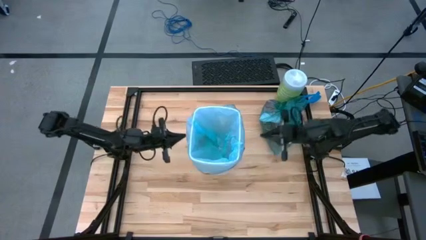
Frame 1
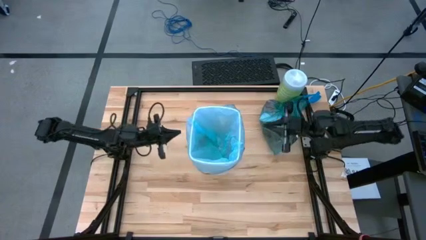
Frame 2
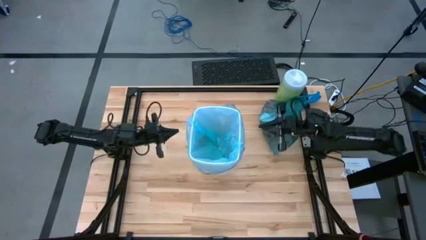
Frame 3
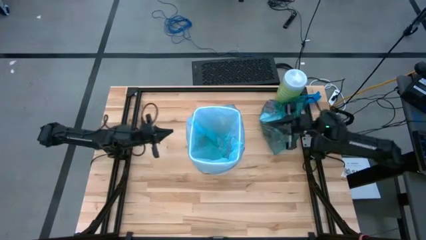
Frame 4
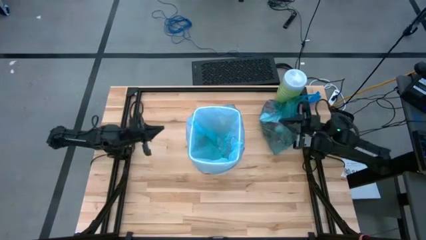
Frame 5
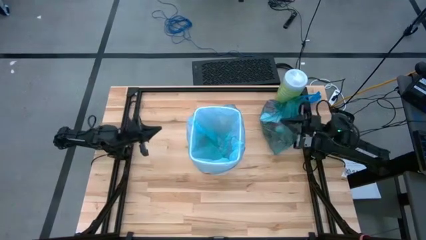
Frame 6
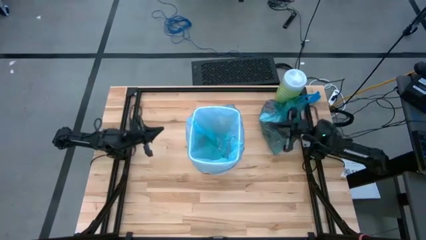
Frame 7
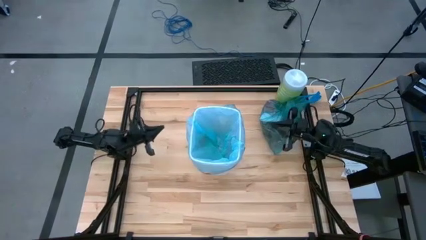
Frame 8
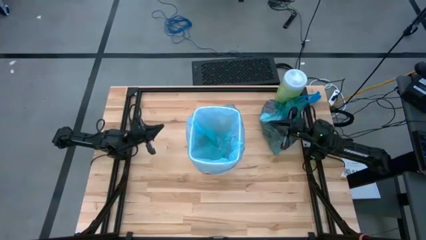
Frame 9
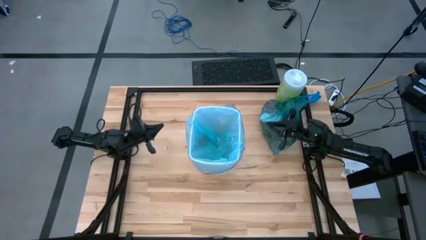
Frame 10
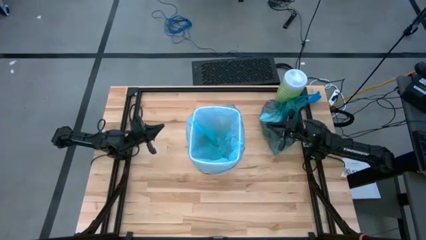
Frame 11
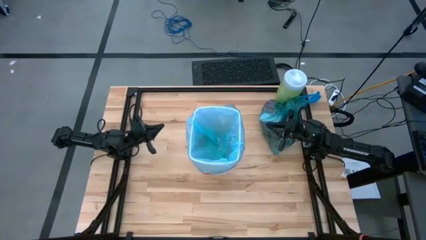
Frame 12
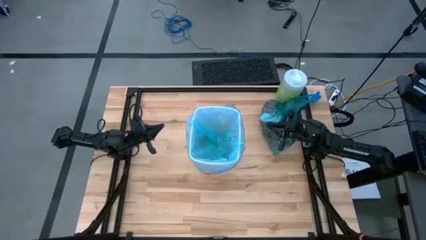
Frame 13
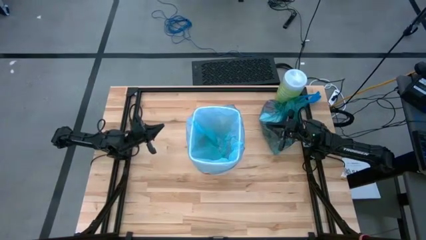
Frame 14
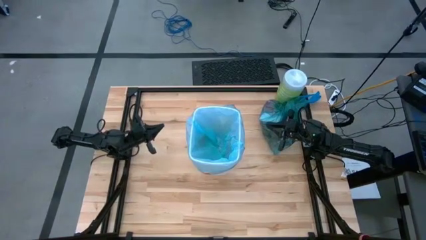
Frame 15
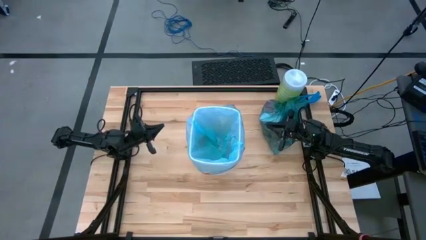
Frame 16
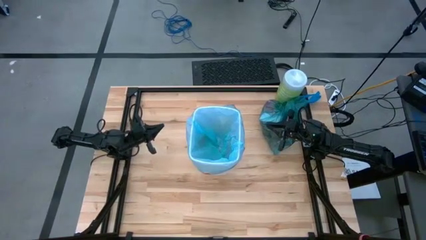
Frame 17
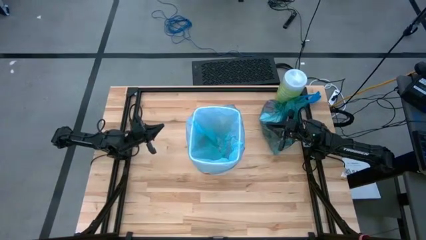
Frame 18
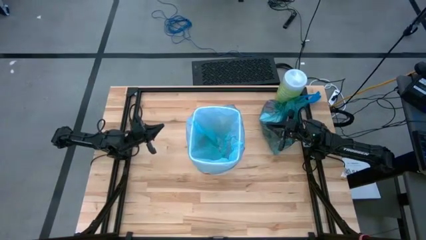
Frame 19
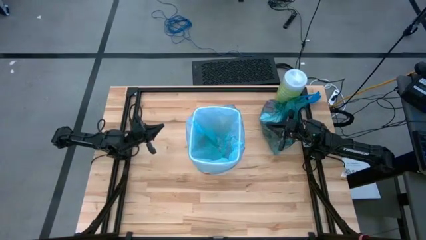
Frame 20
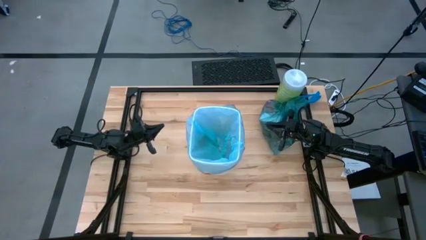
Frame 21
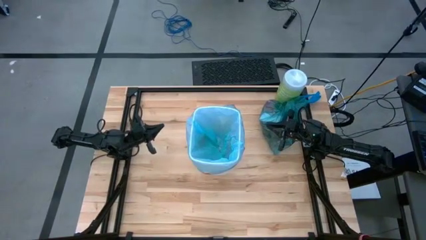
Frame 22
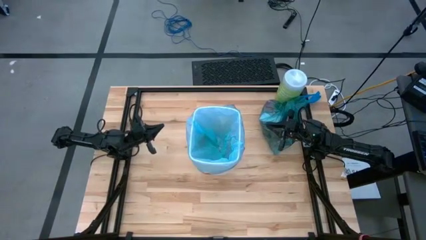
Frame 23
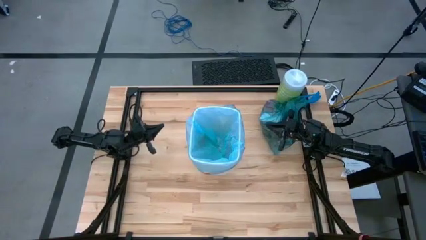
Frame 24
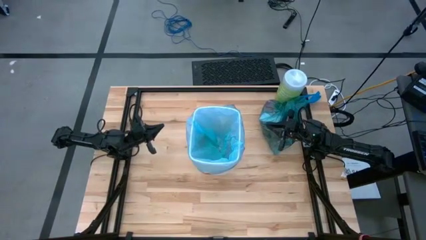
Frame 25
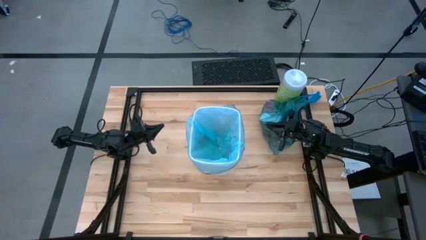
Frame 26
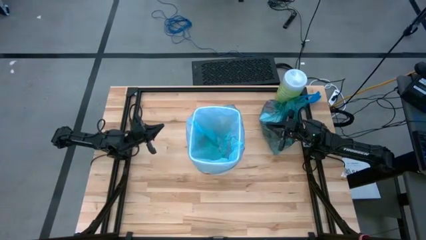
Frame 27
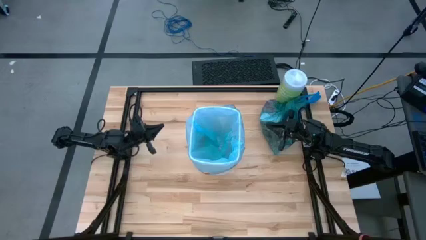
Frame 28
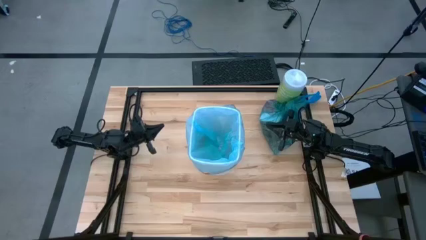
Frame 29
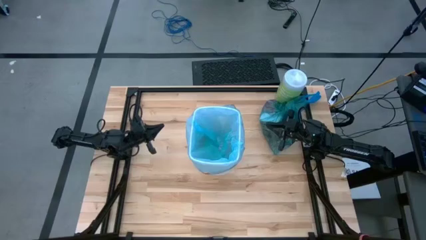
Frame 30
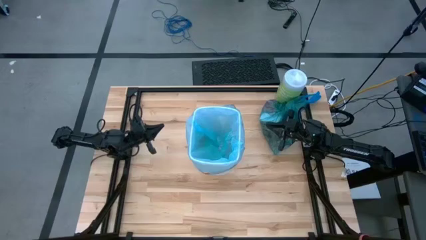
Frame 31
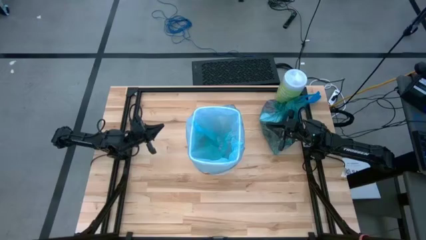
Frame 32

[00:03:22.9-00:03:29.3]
Task: place trash/remove bag and relplace
Return to Home Position

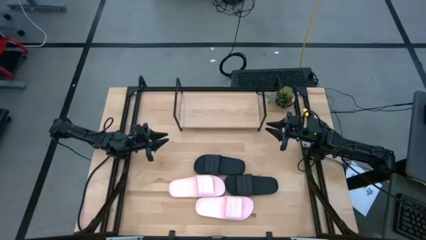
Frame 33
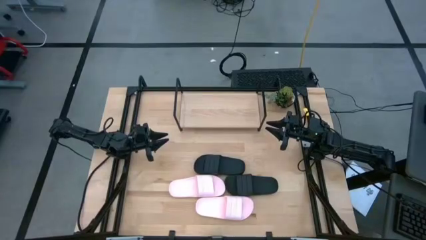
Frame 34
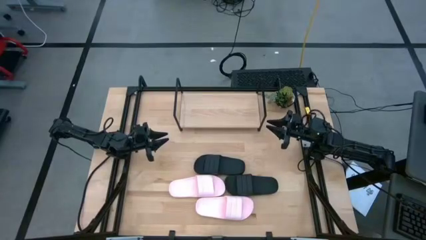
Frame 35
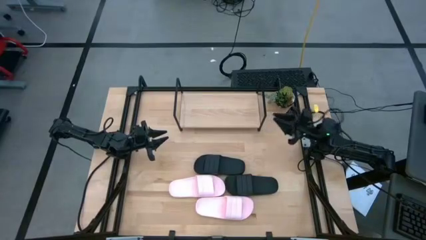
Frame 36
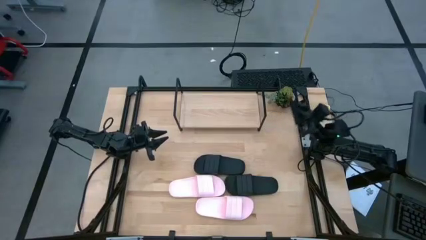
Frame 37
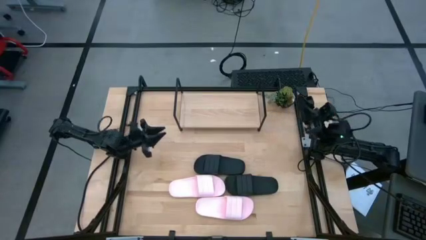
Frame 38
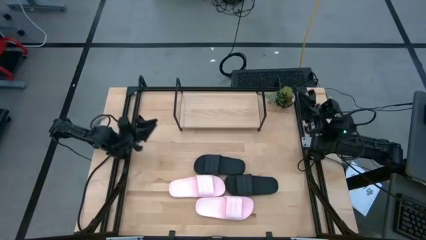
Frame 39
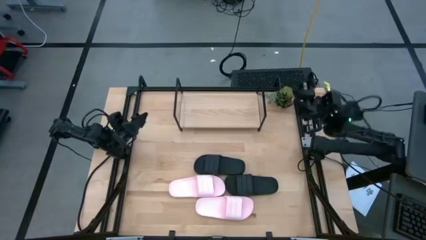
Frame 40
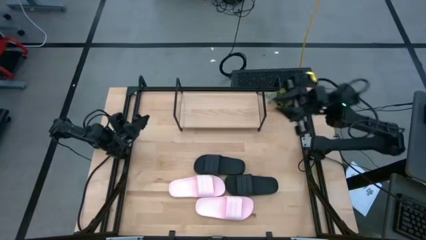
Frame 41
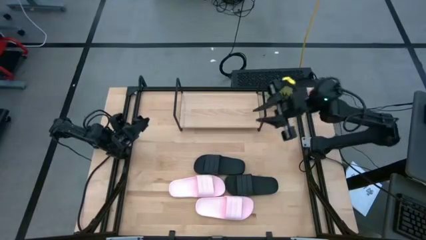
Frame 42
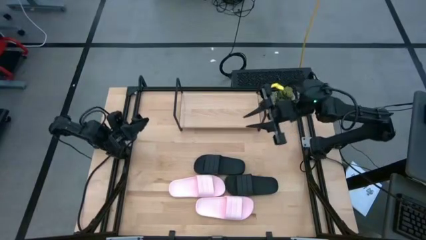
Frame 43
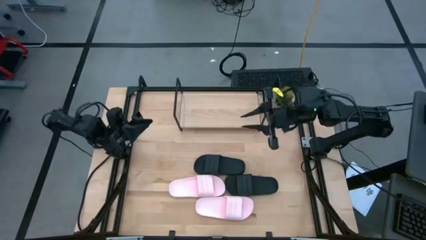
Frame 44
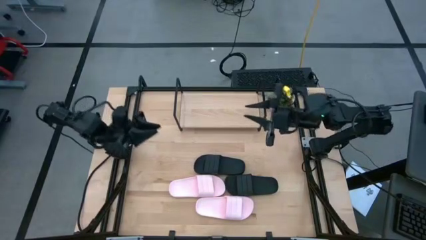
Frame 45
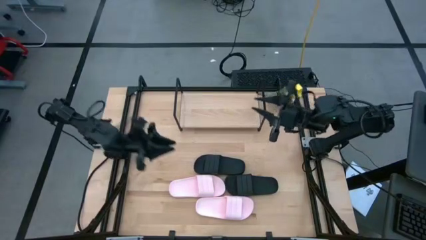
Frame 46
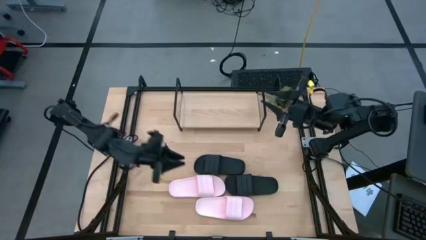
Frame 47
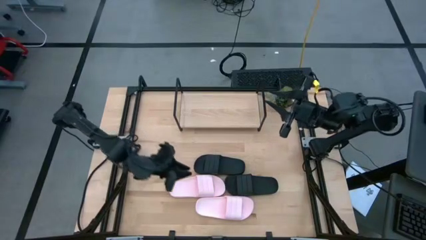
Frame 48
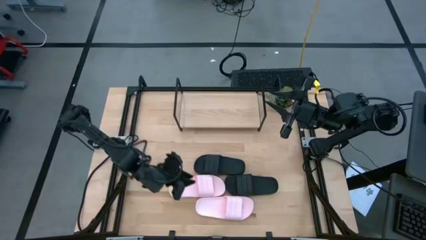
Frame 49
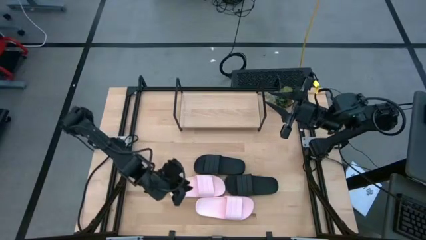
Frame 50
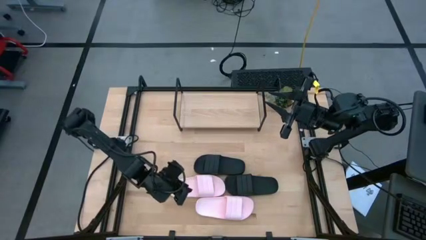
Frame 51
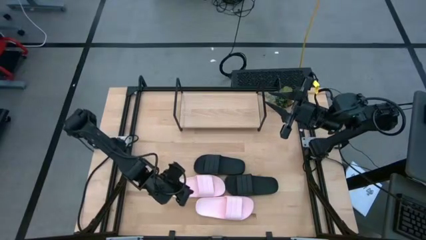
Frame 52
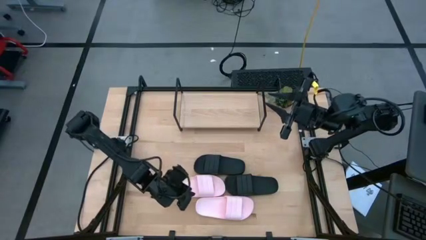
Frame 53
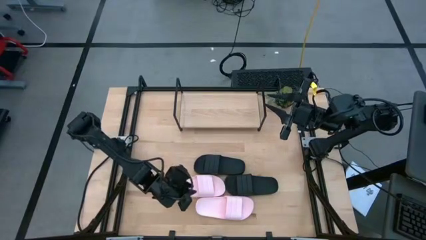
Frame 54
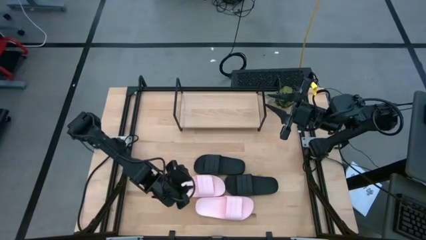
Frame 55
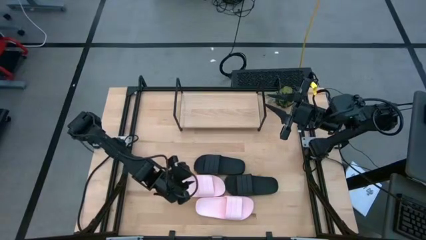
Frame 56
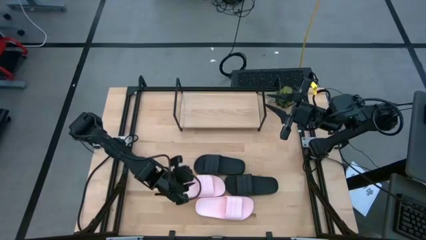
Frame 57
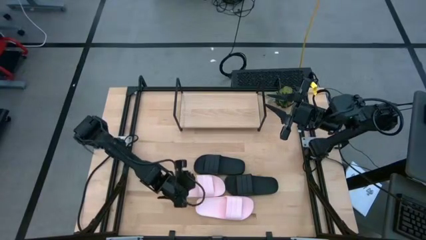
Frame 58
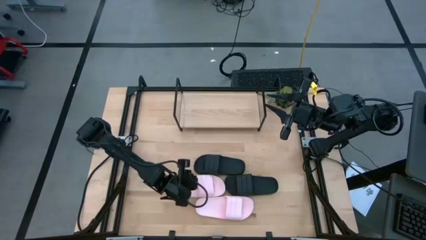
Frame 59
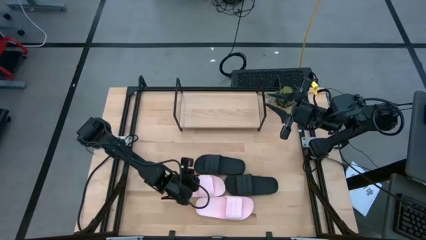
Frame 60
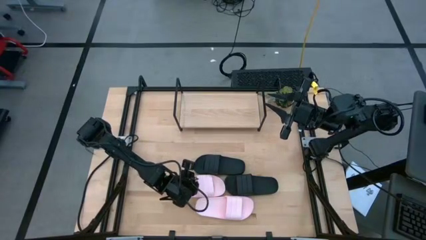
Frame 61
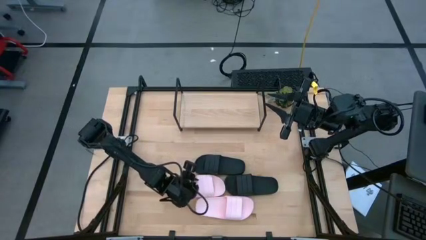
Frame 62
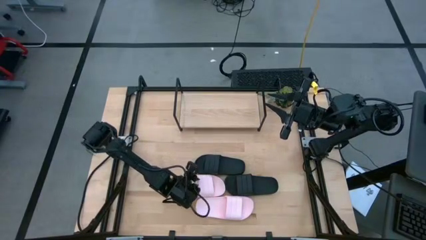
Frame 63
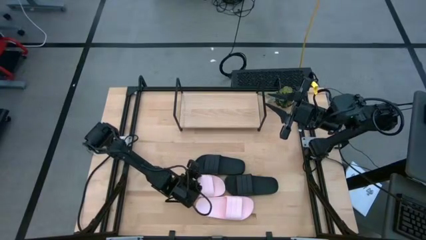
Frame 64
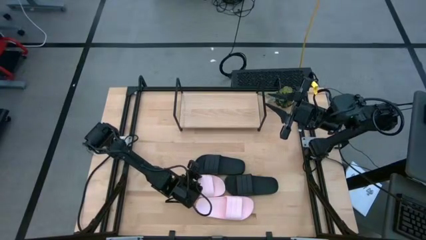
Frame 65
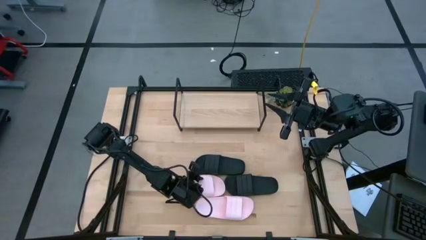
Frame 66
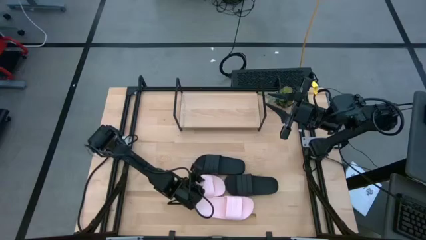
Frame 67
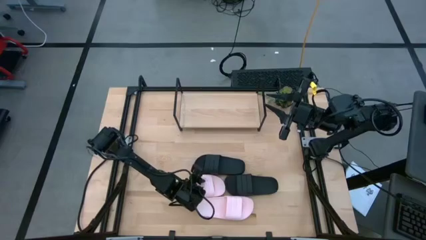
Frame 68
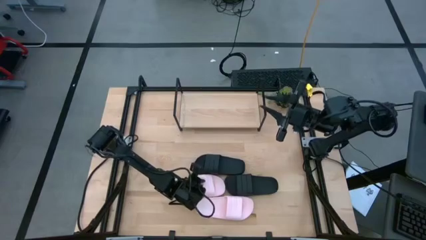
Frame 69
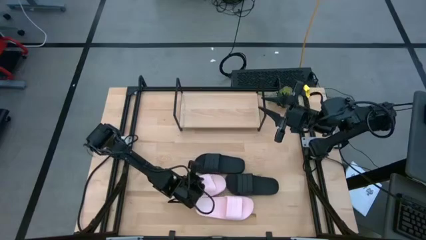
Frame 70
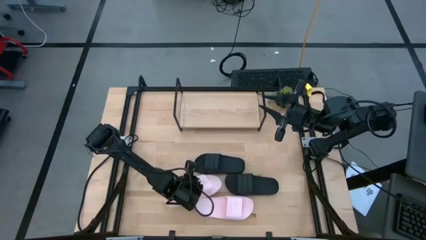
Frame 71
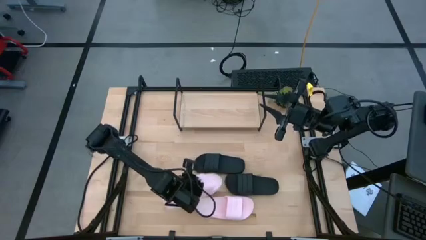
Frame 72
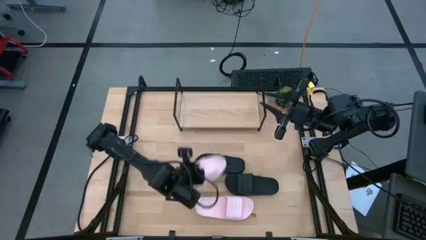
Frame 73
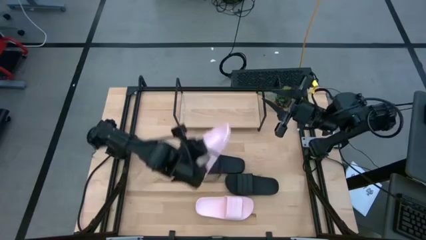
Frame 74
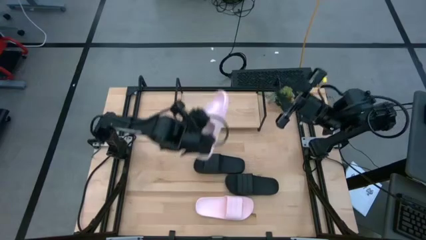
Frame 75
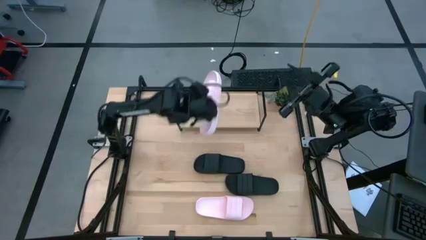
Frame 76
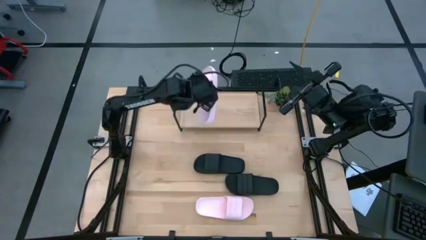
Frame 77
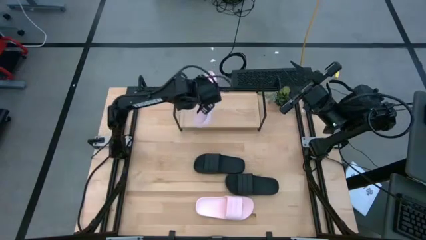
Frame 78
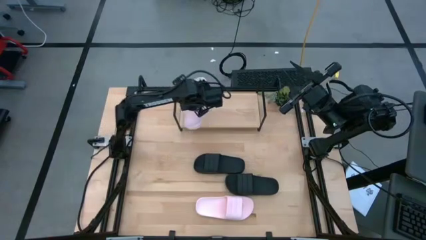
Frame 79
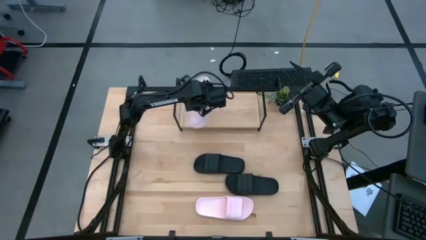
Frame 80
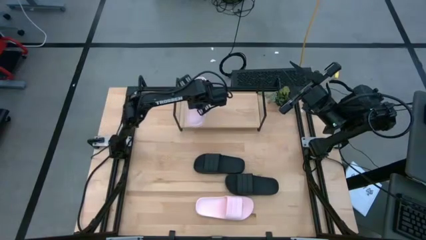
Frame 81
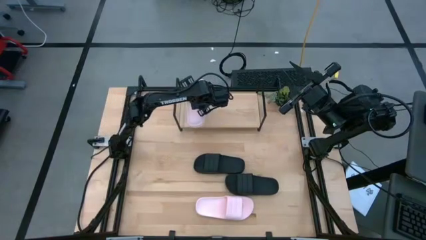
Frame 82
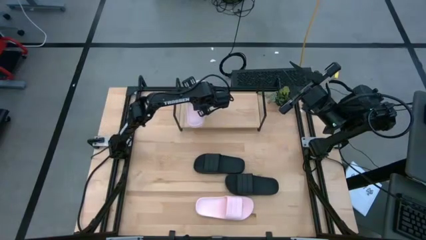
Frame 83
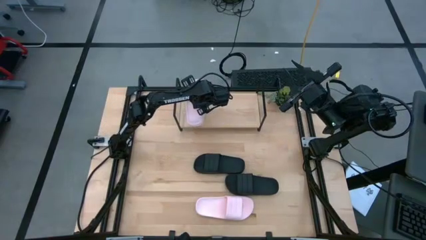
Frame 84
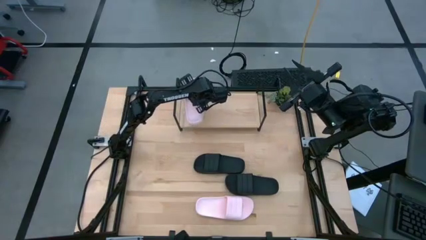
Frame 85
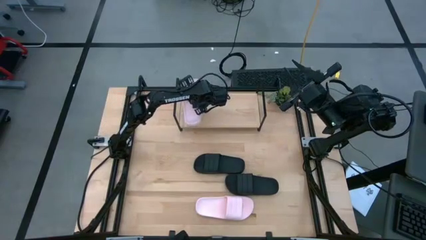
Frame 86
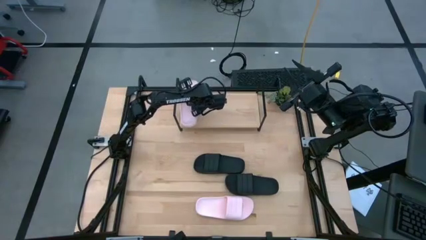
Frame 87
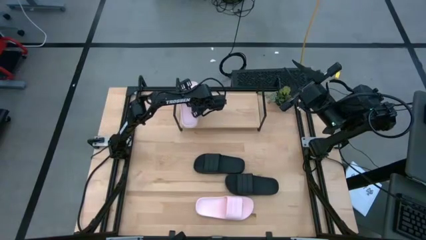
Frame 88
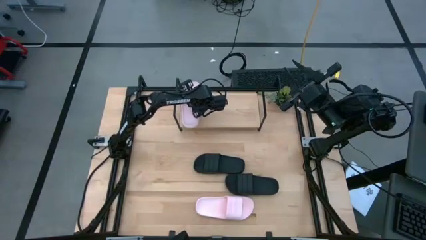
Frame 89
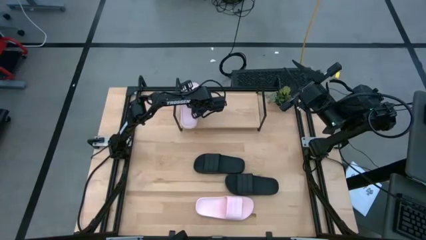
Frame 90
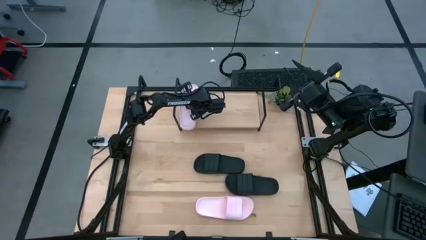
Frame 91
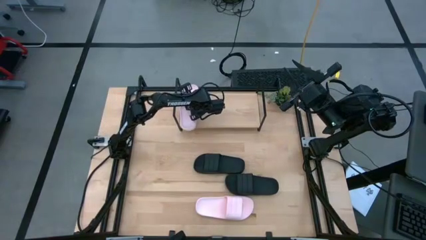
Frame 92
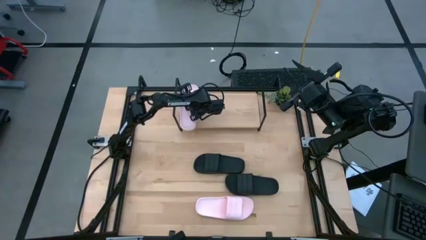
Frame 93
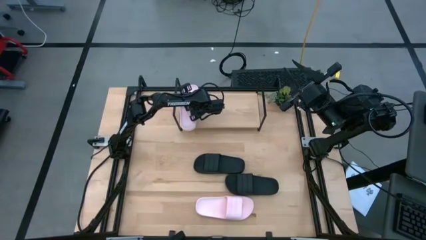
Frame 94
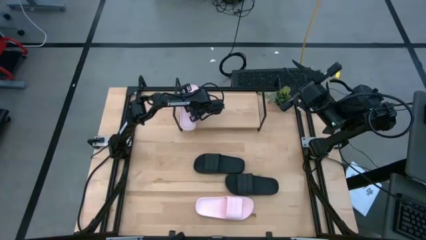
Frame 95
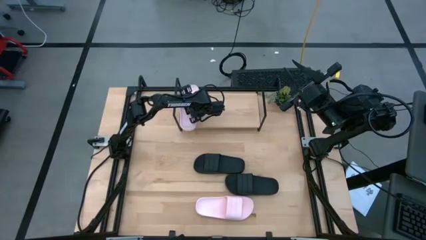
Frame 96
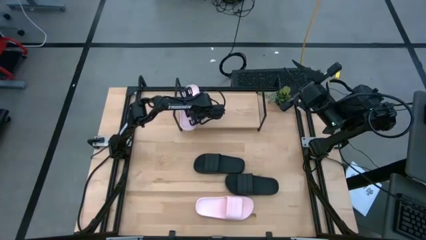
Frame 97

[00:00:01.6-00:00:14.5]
Task: Pick and place slides into the shelf
Put the top pink slipper on the shelf
